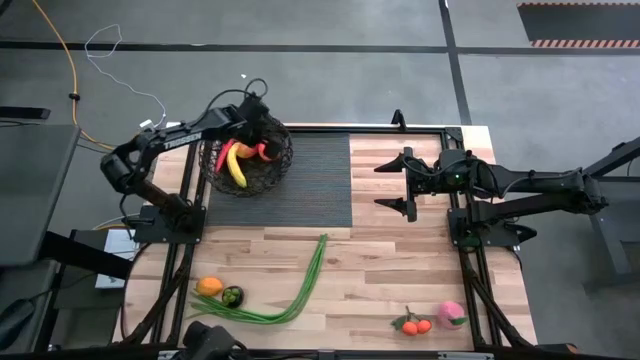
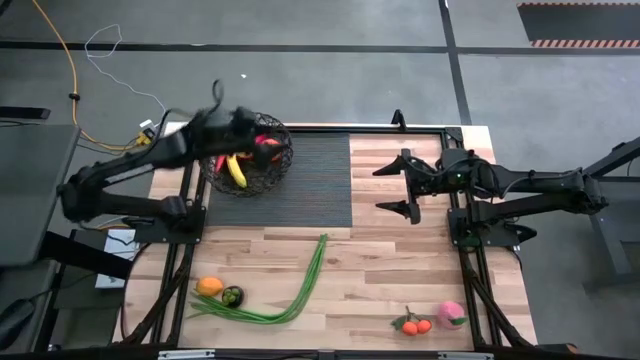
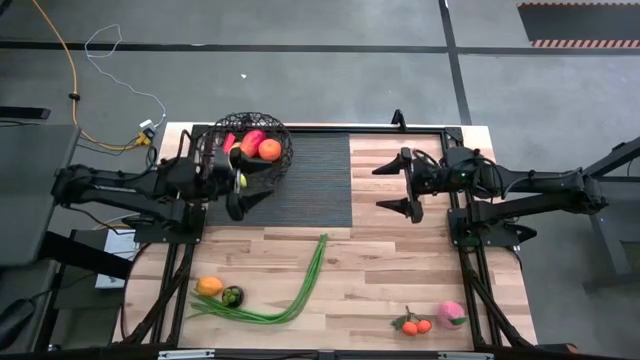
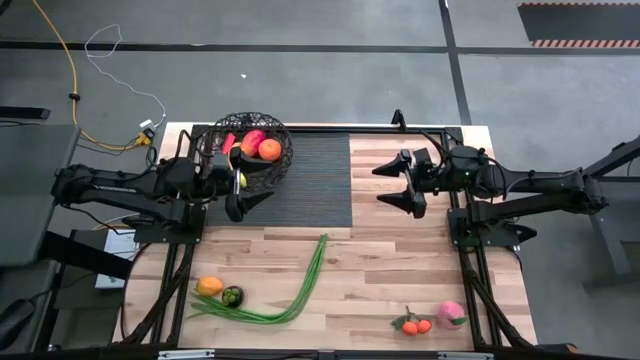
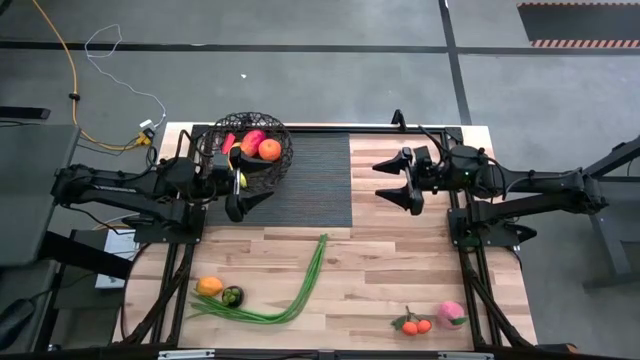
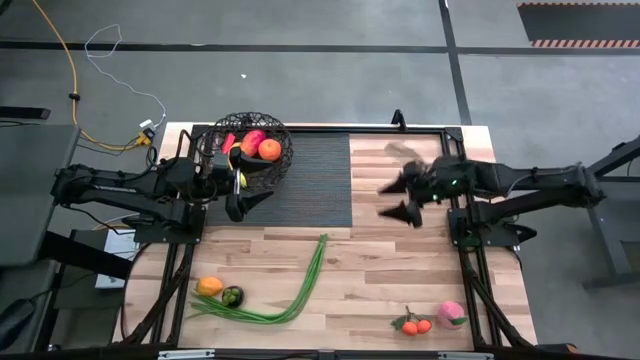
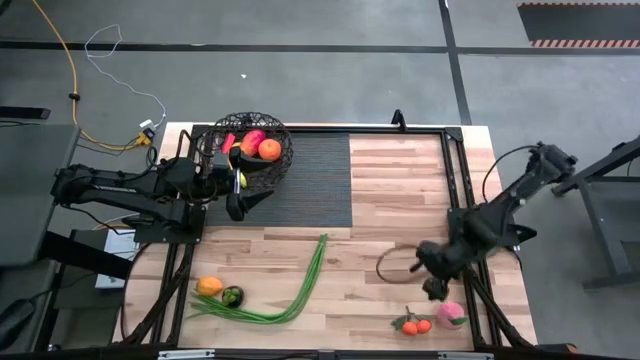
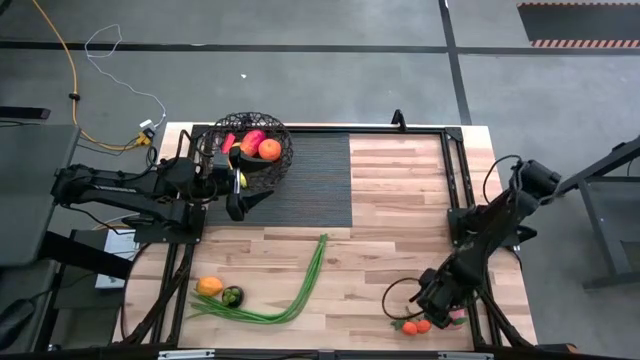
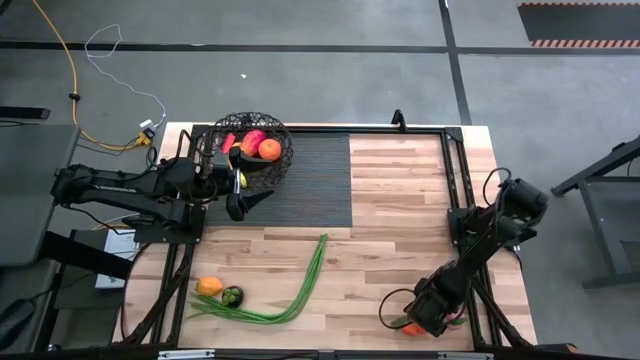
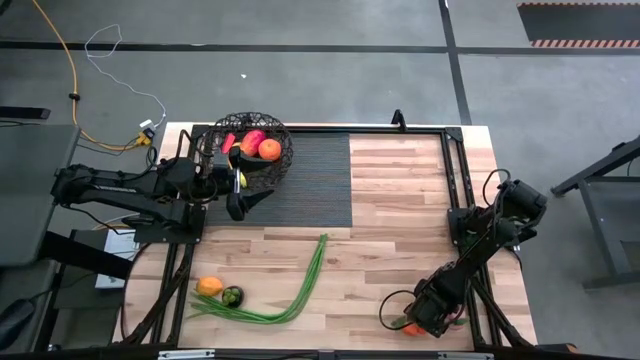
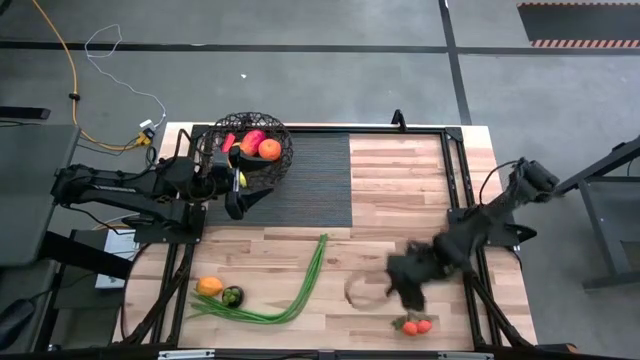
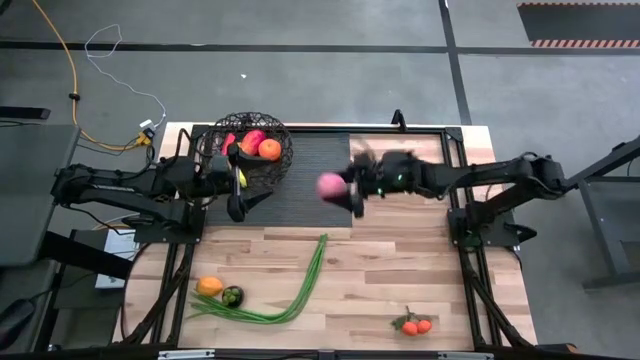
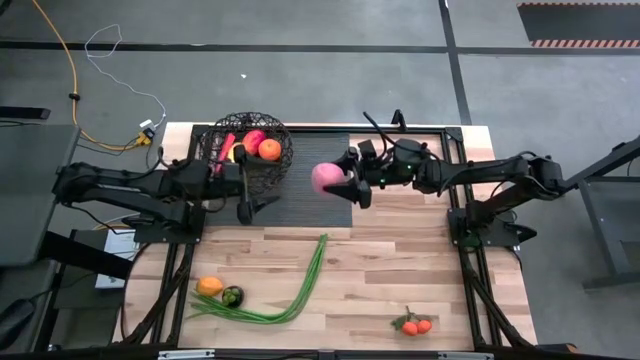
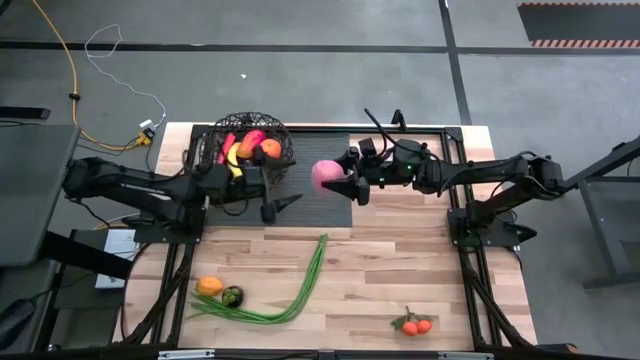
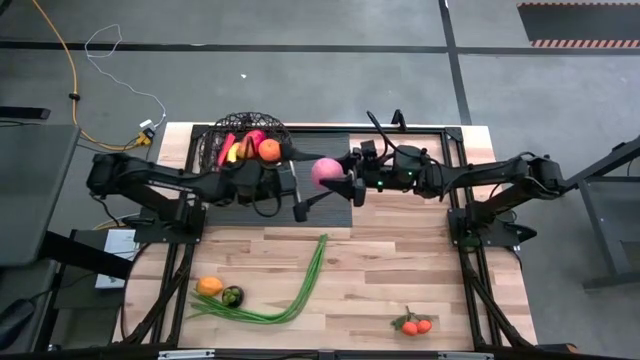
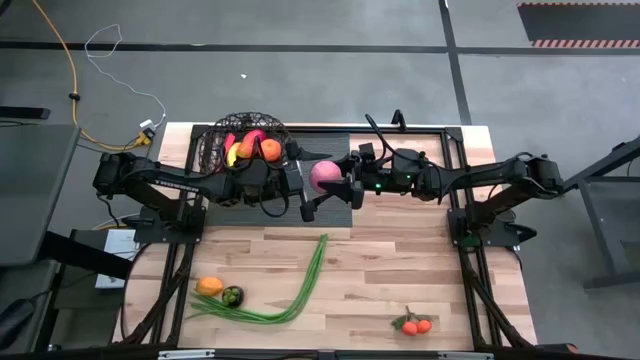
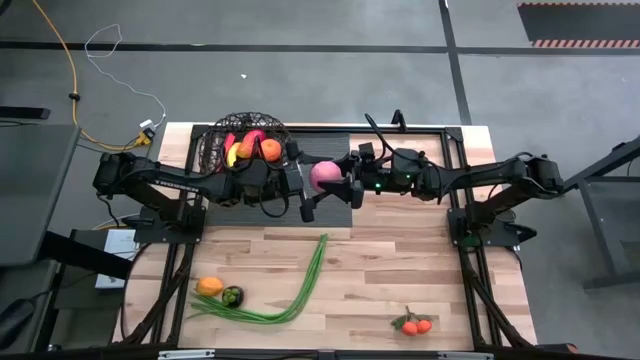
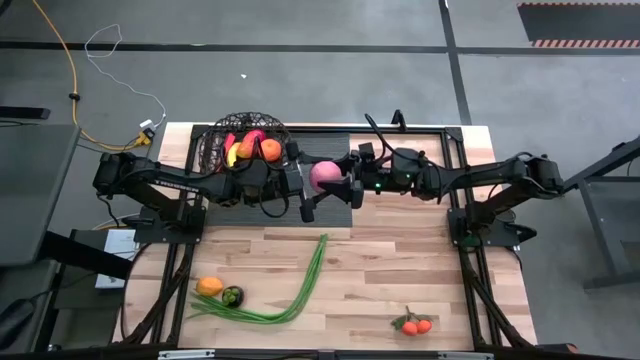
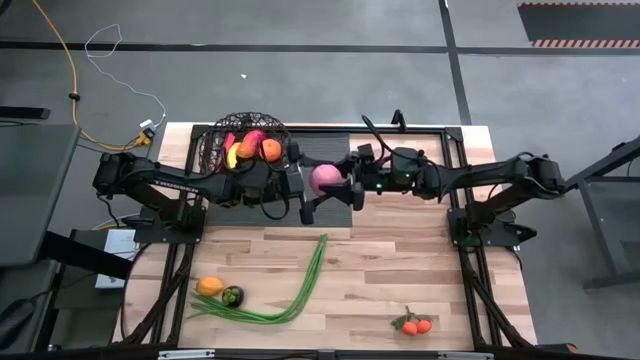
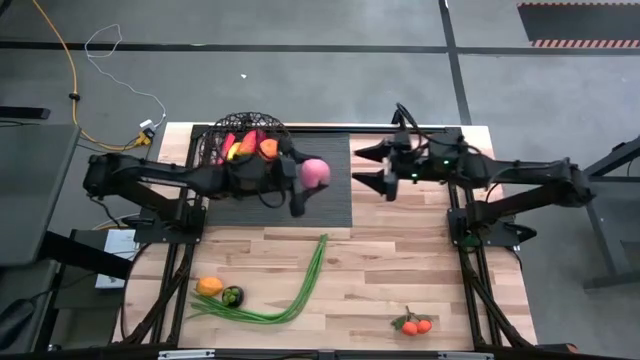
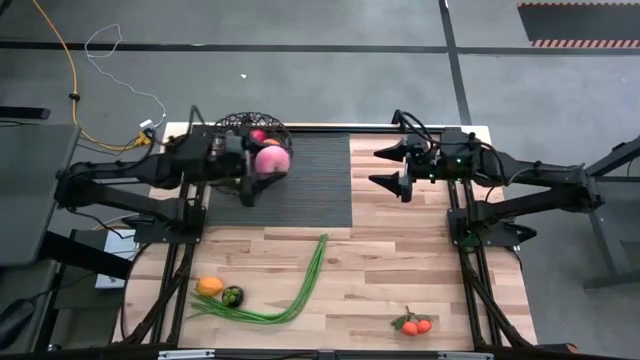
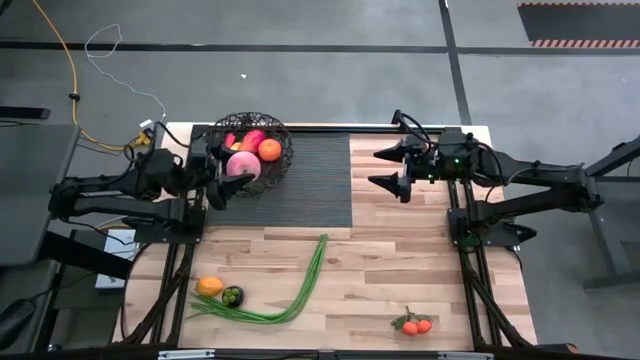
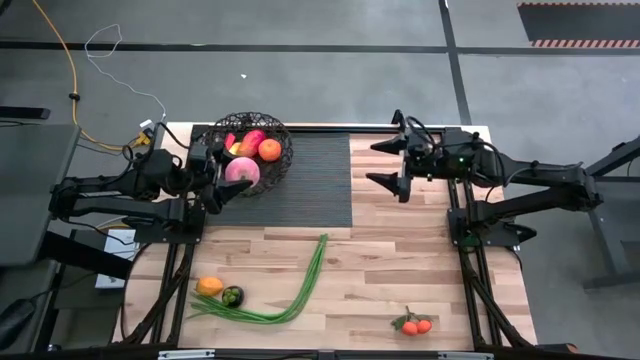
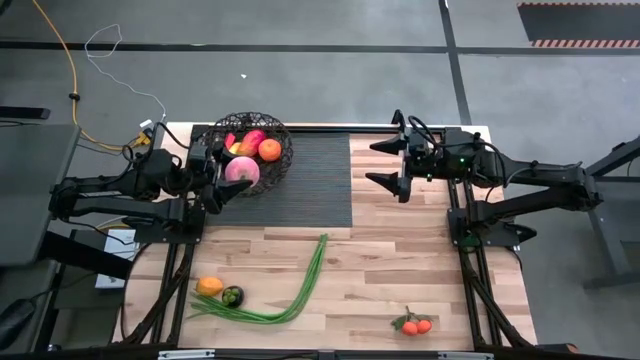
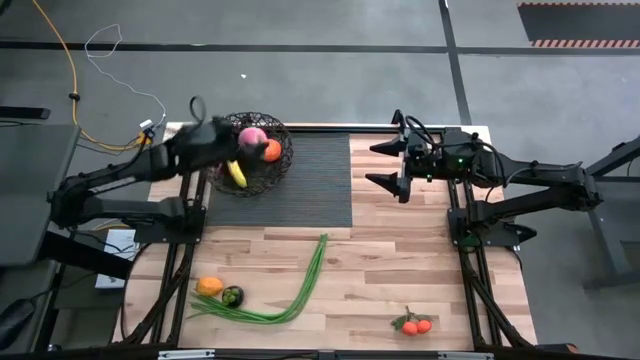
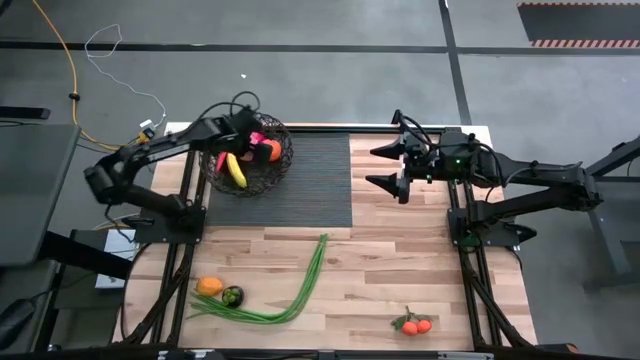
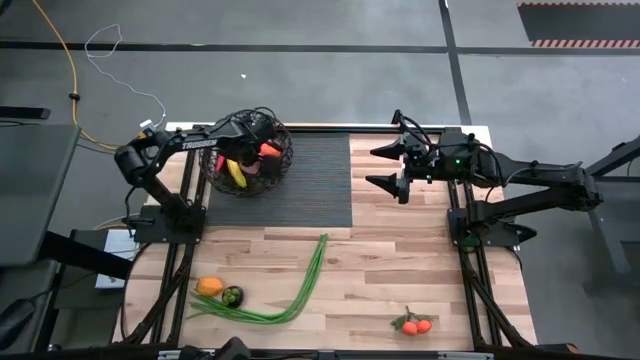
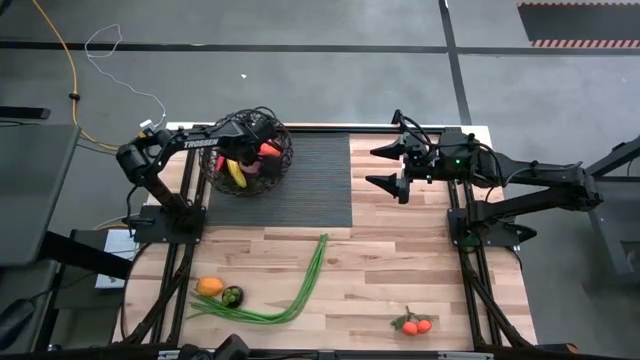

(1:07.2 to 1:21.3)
Task: Build produce basket
Put the pink peach into the black basket

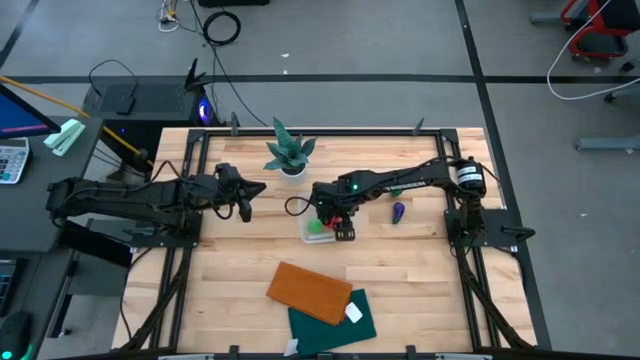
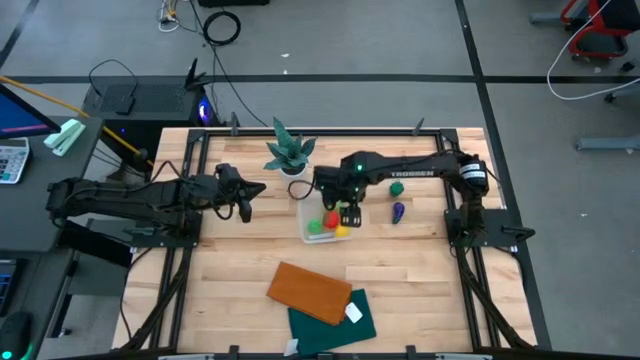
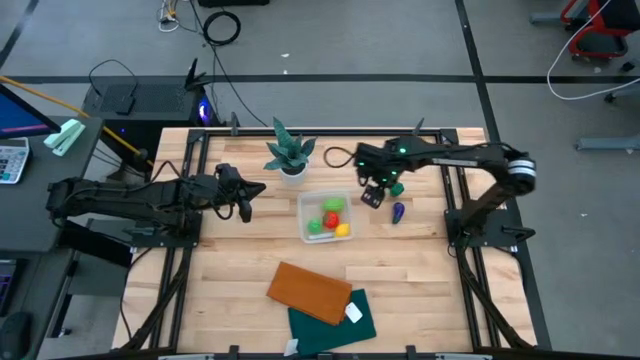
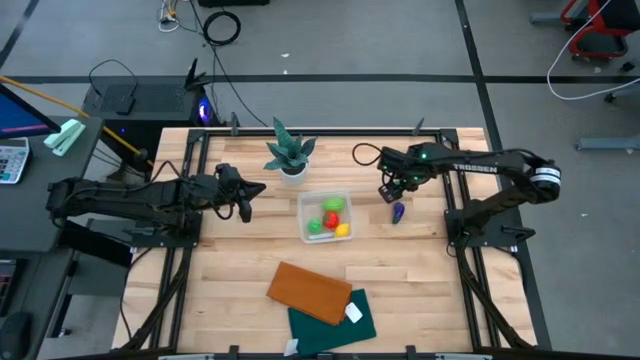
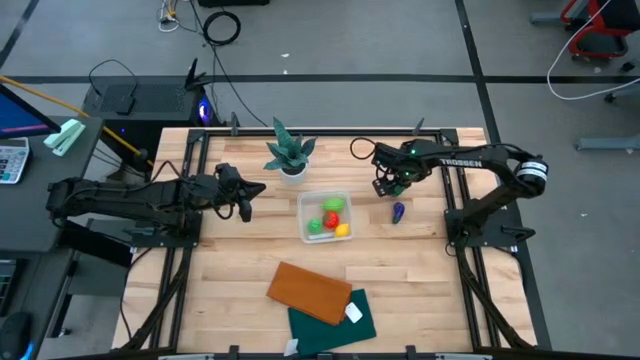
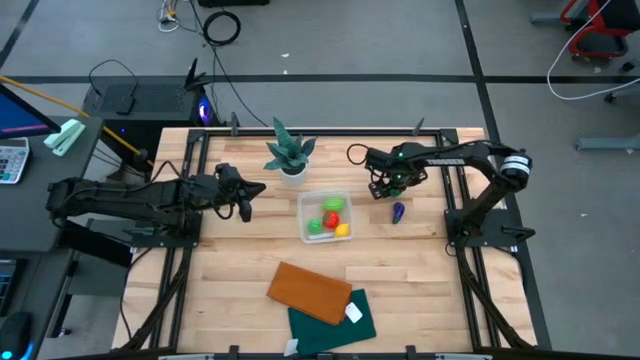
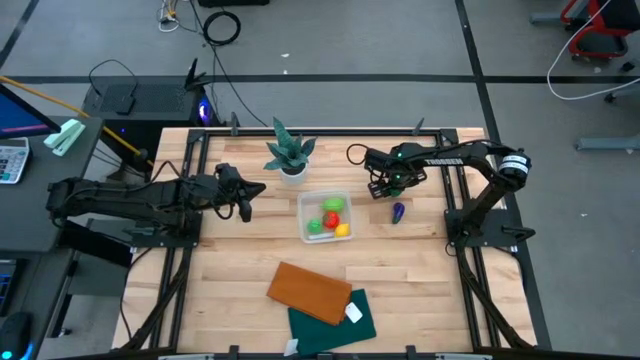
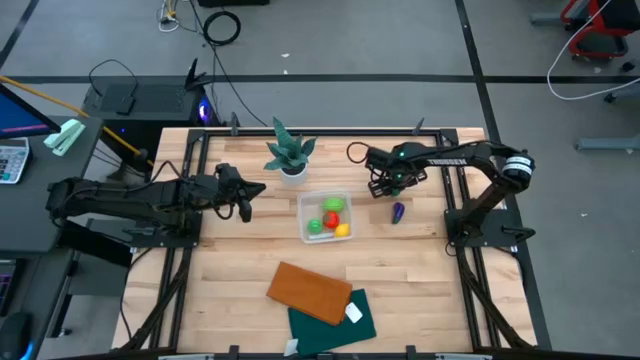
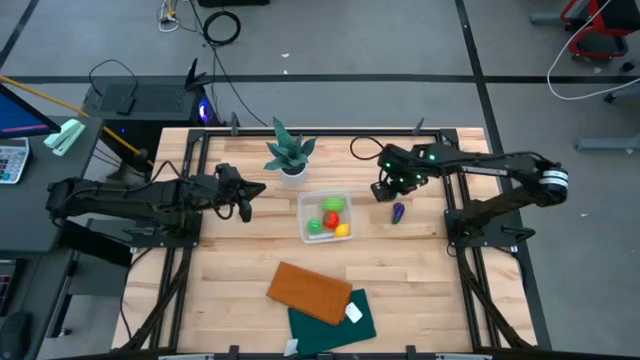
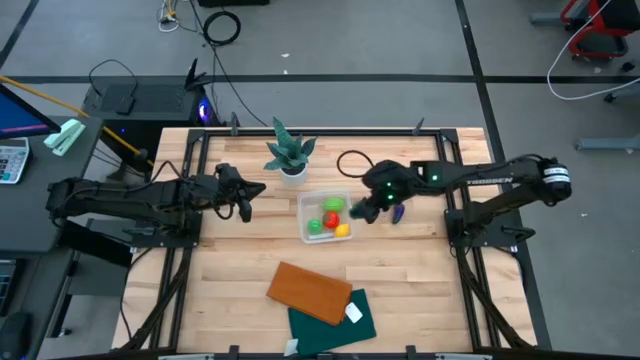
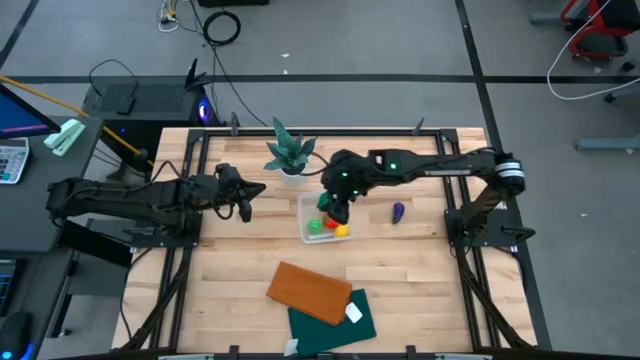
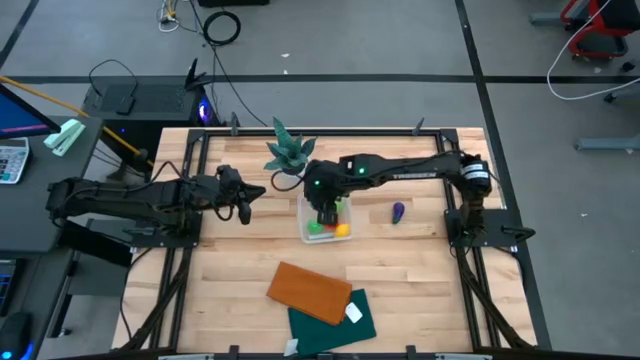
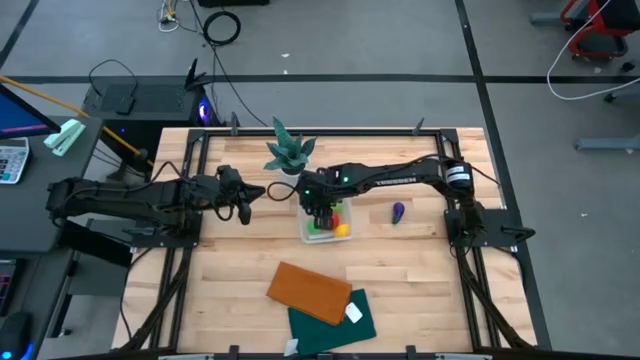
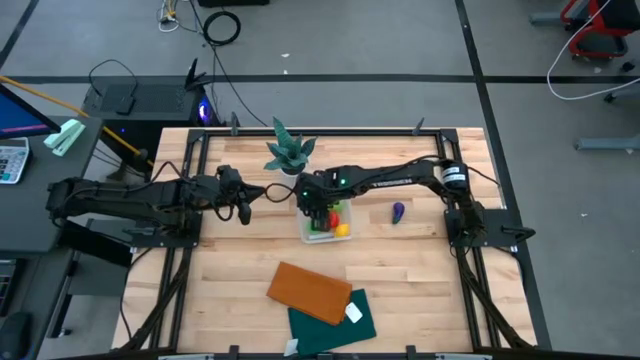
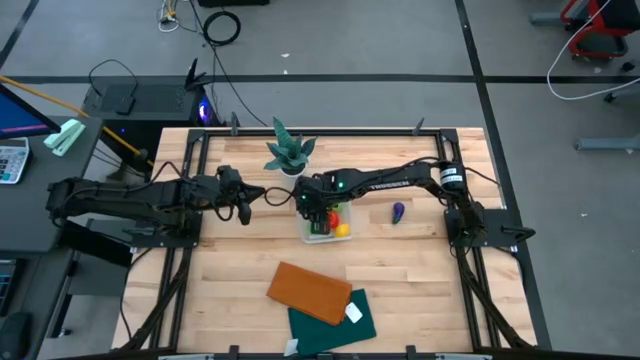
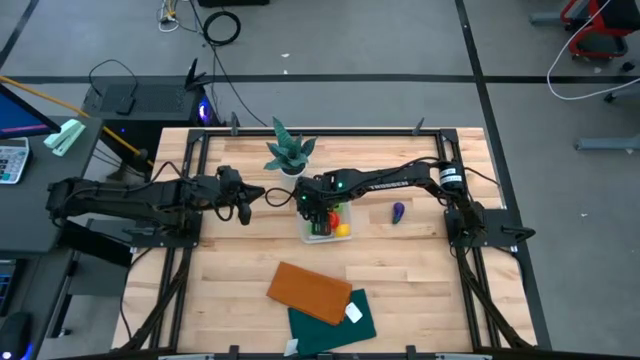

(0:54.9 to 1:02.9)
Task: Pick and placing Produce into tupperware
Put the bell pepper into the transparent bin
